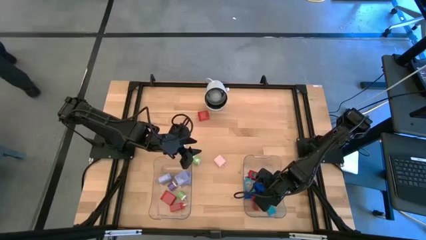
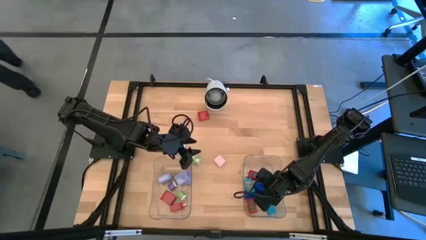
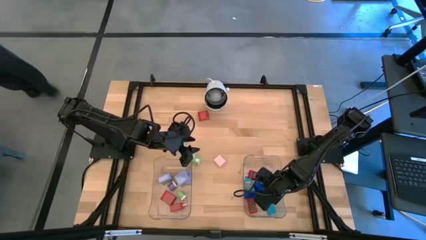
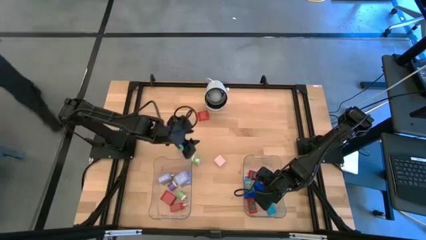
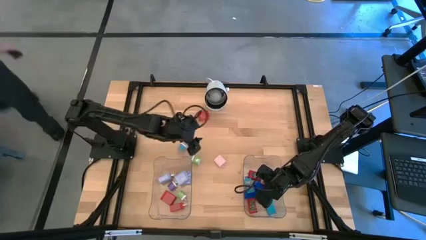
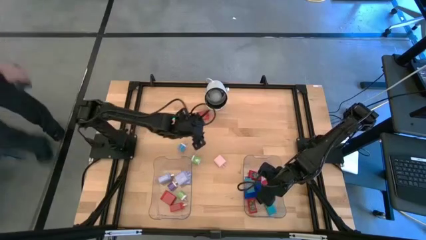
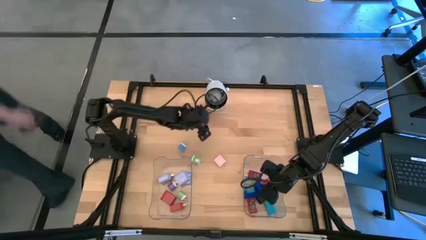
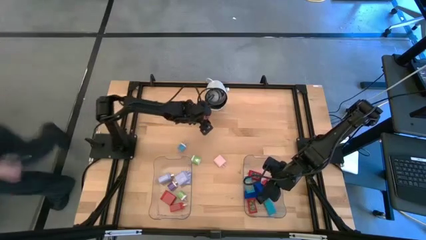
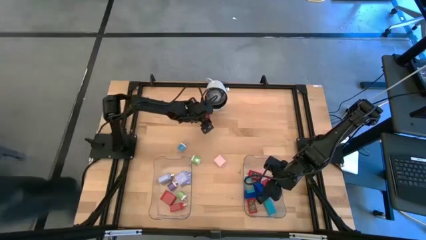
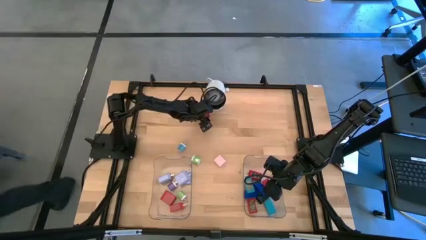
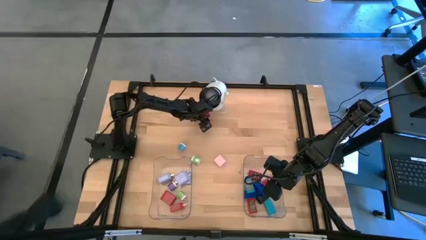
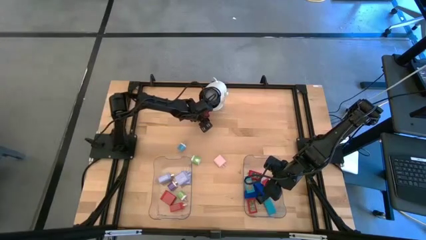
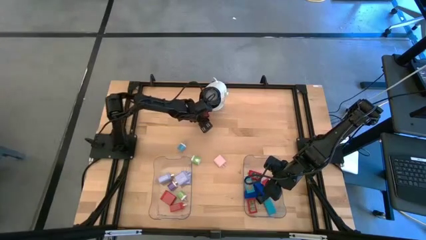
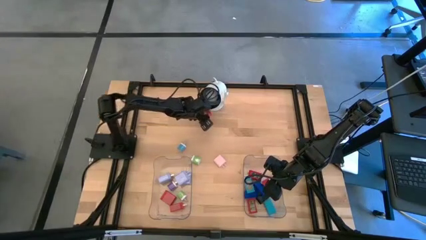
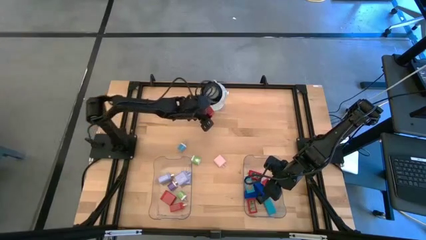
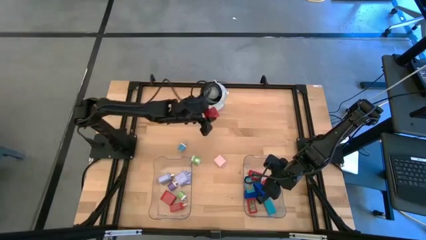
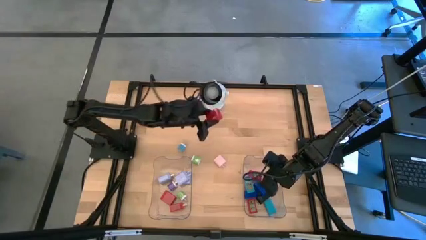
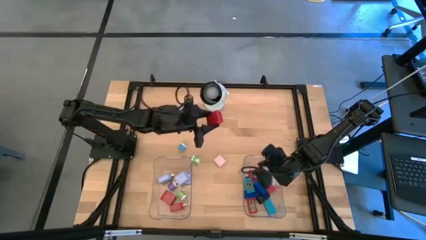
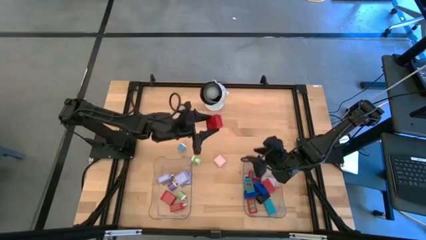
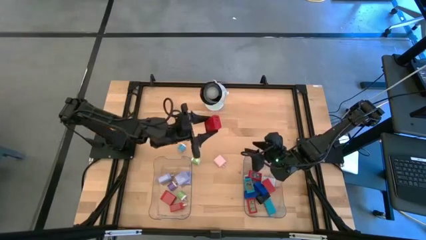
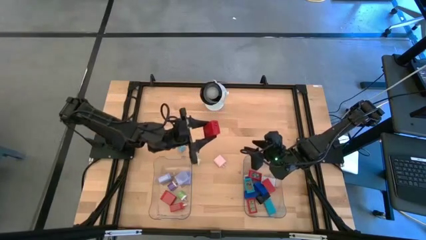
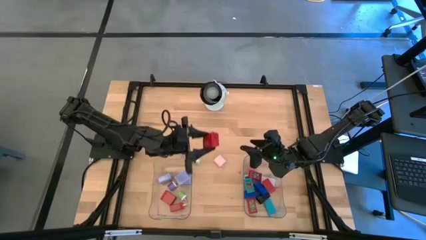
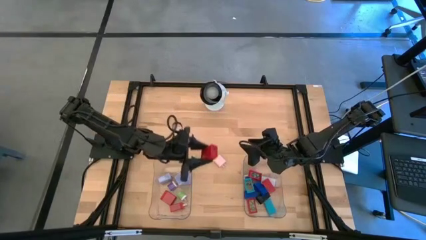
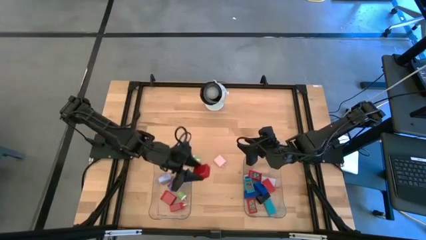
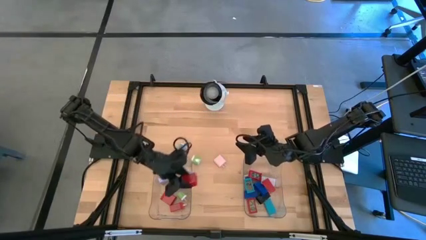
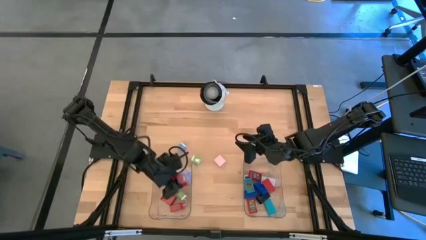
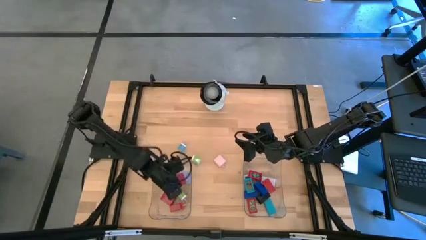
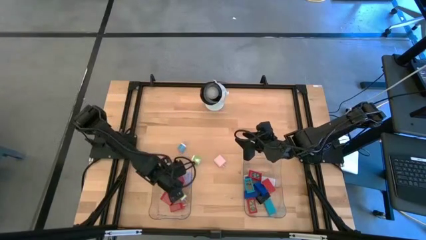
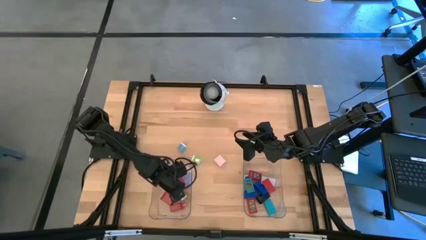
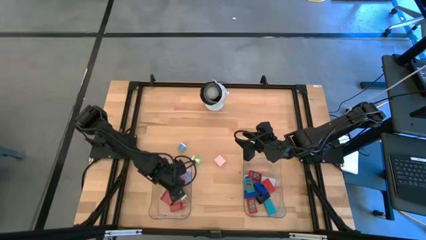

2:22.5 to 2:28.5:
Task: Pick & Place Office items
Put the red charger adapter into the left transparent bin

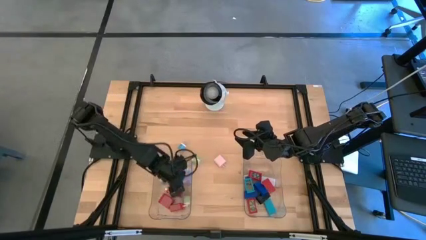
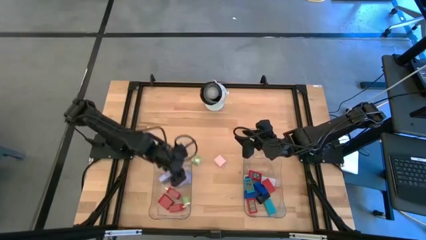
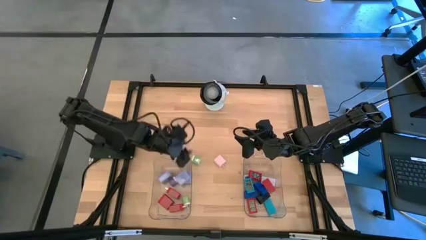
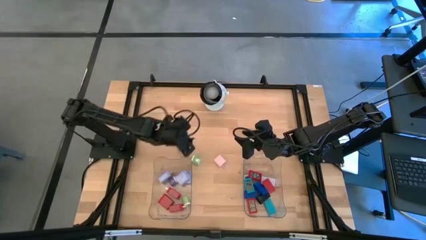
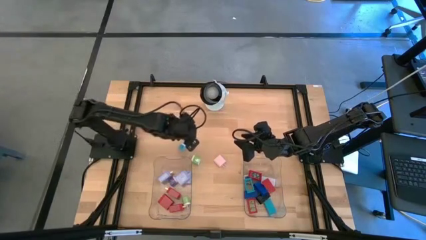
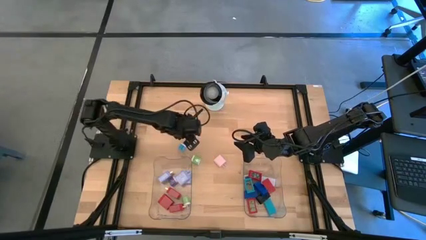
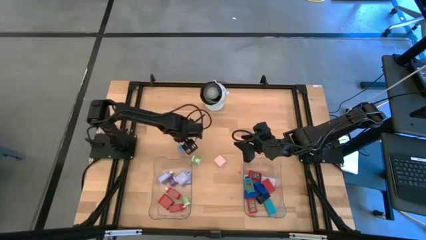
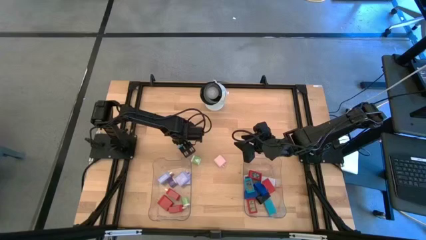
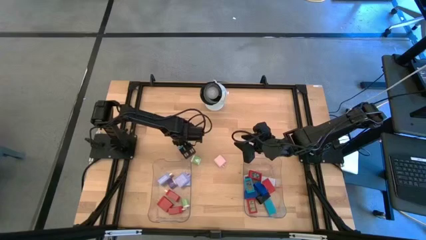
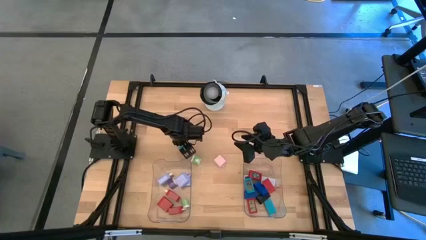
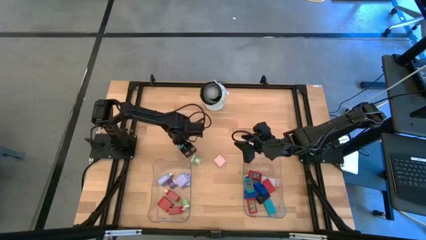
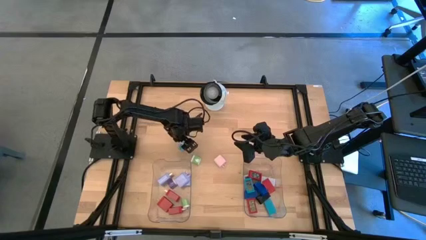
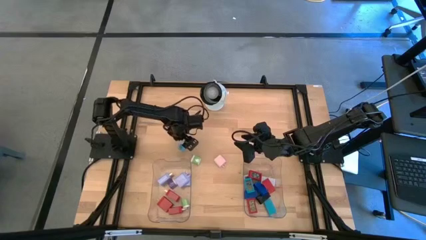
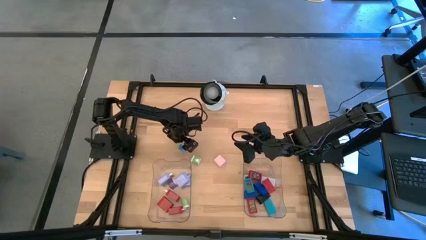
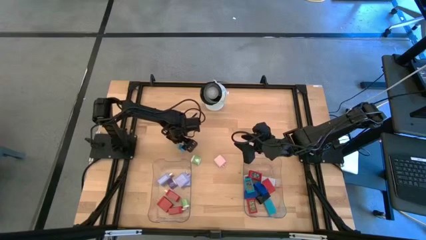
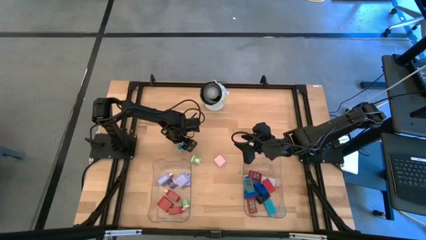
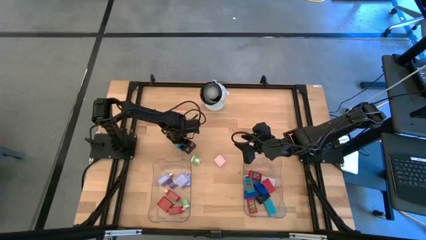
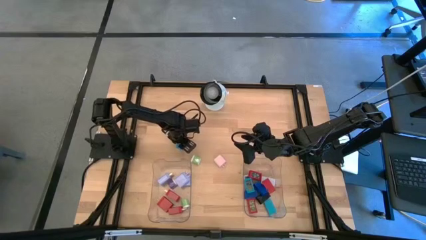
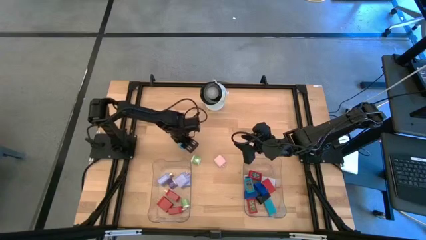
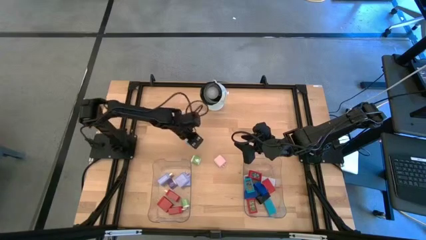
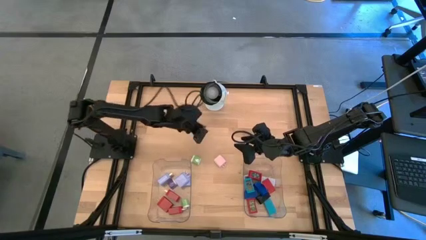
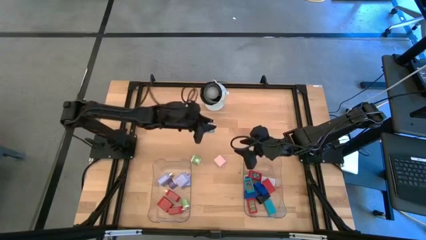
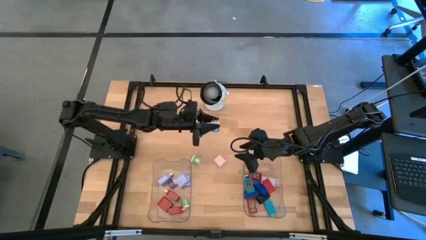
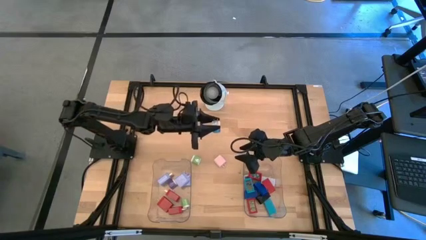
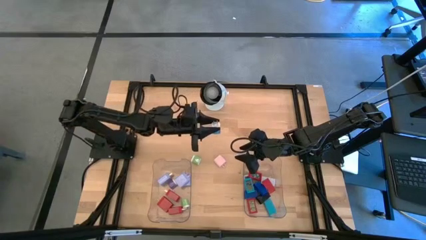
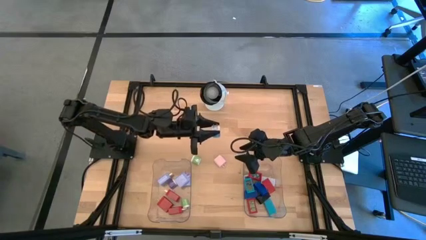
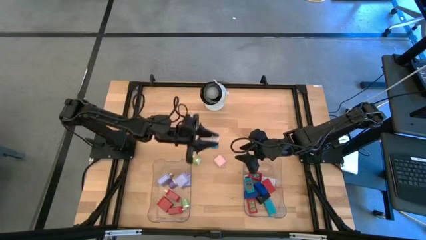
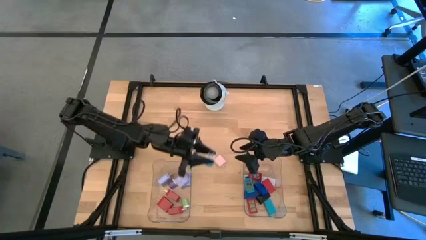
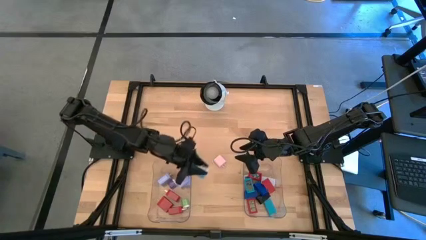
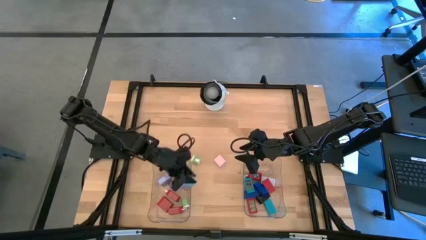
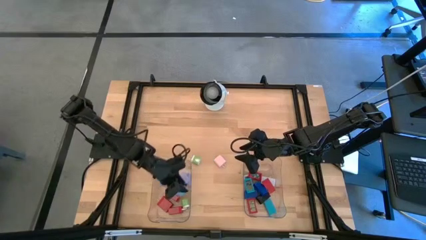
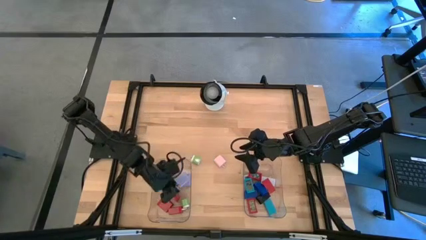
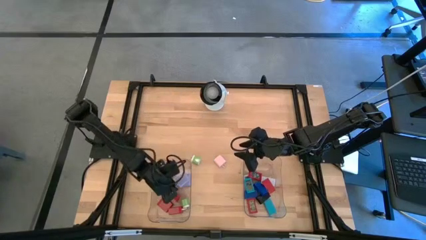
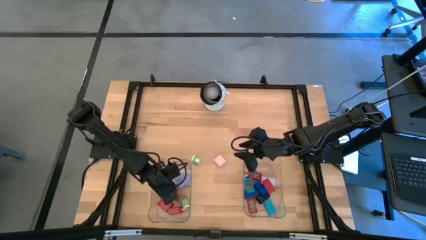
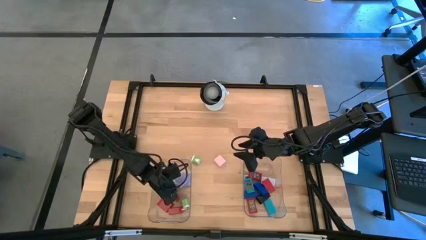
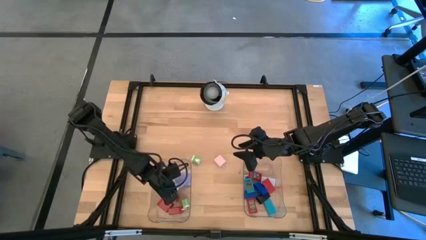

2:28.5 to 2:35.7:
Put the blue charger adapter into the left transparent bin
